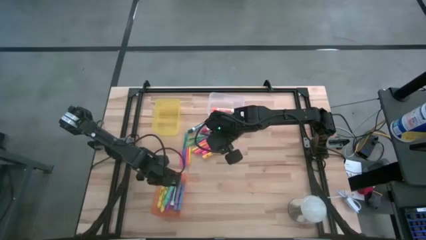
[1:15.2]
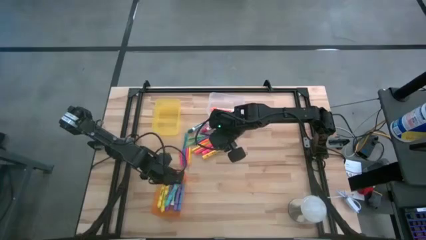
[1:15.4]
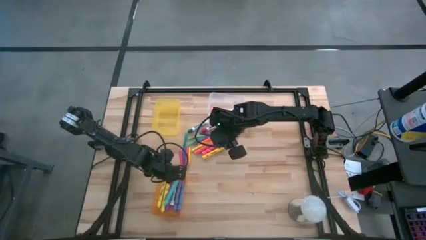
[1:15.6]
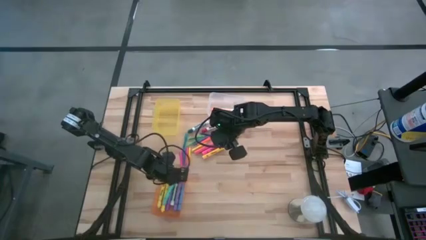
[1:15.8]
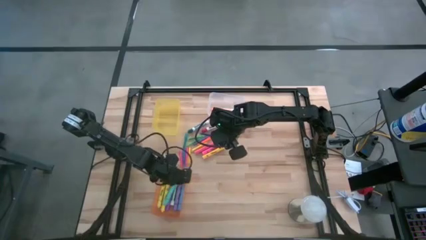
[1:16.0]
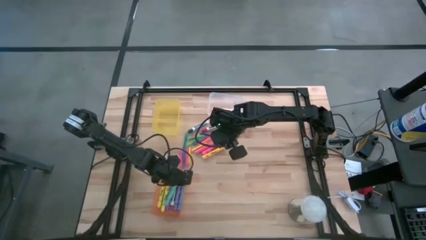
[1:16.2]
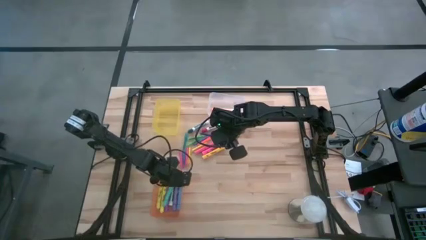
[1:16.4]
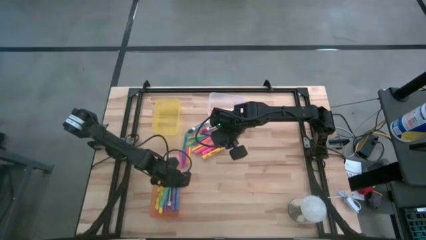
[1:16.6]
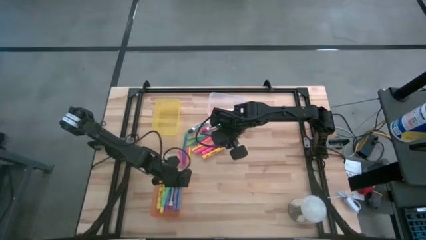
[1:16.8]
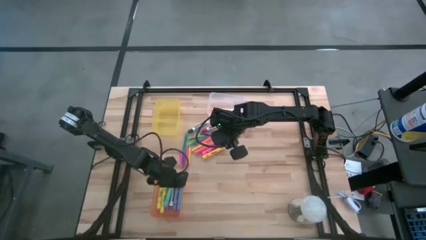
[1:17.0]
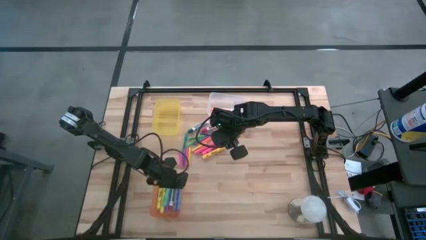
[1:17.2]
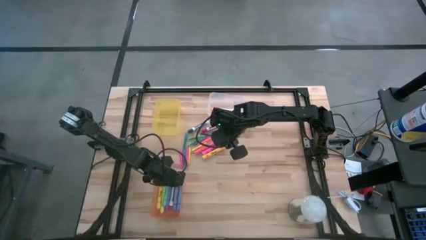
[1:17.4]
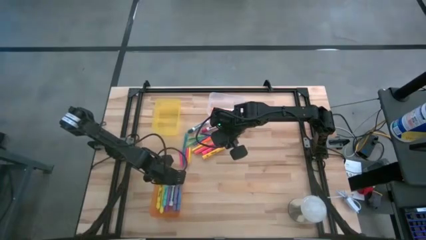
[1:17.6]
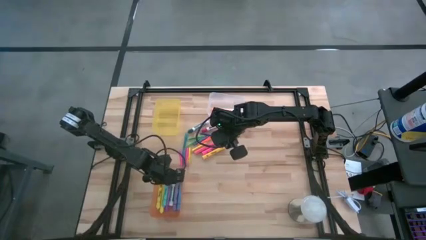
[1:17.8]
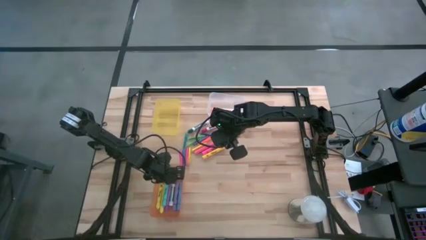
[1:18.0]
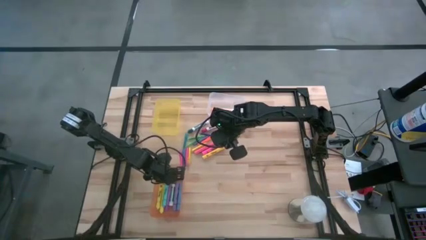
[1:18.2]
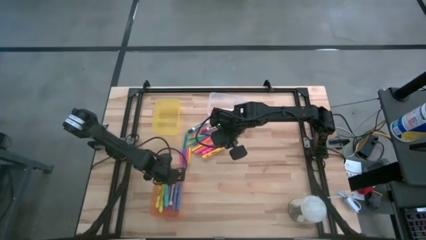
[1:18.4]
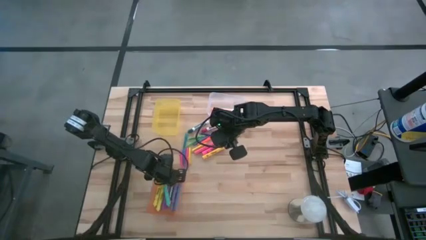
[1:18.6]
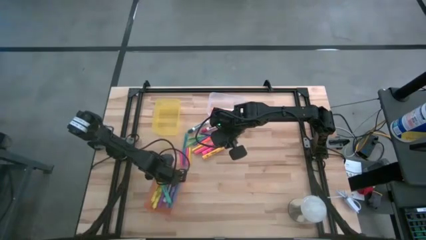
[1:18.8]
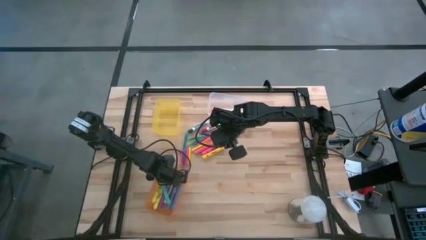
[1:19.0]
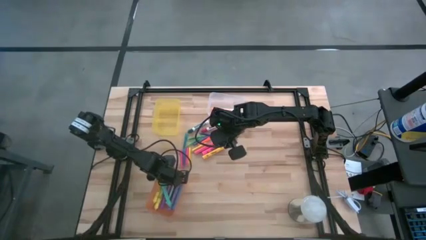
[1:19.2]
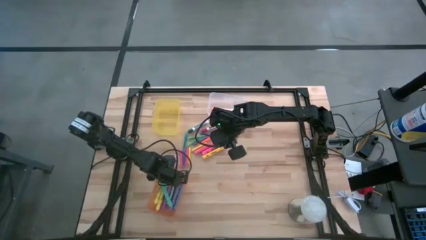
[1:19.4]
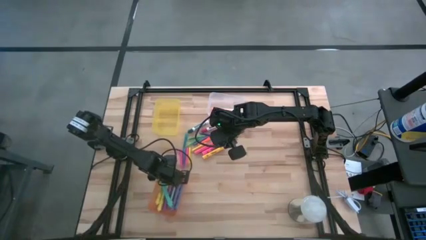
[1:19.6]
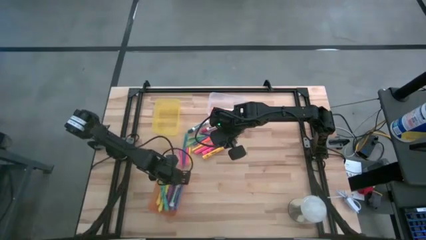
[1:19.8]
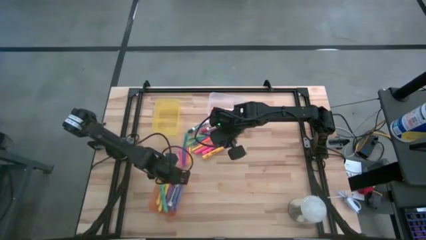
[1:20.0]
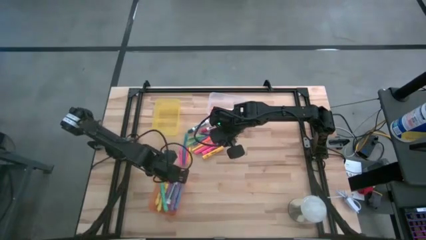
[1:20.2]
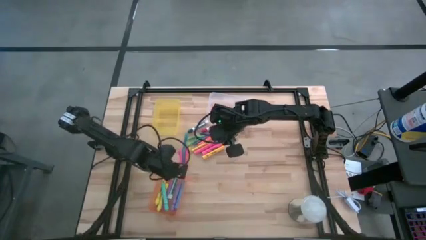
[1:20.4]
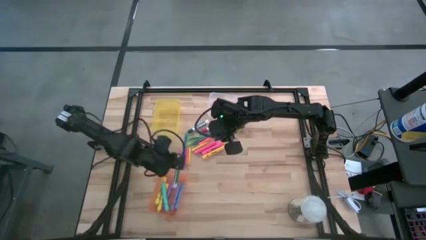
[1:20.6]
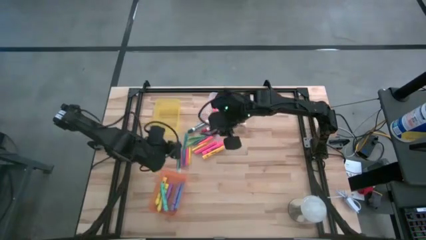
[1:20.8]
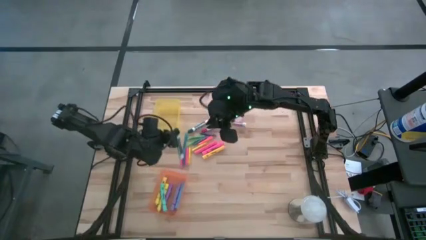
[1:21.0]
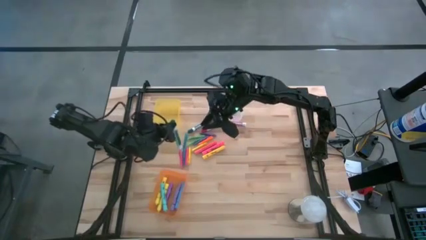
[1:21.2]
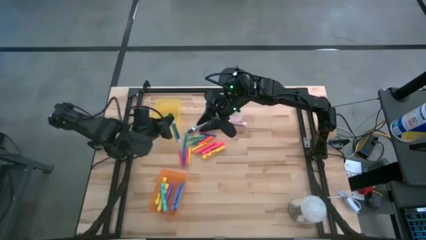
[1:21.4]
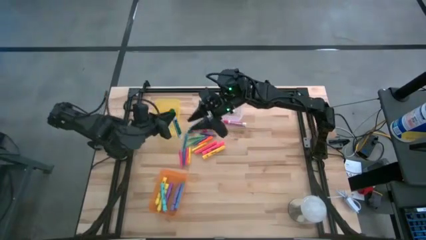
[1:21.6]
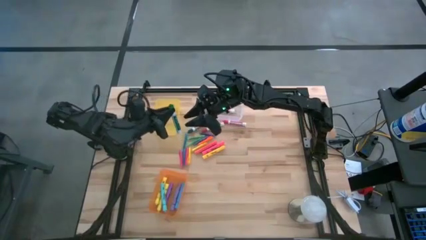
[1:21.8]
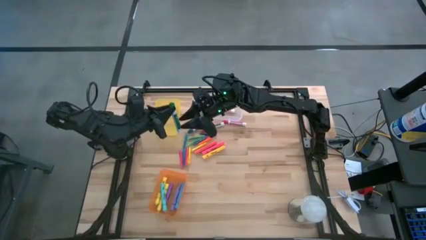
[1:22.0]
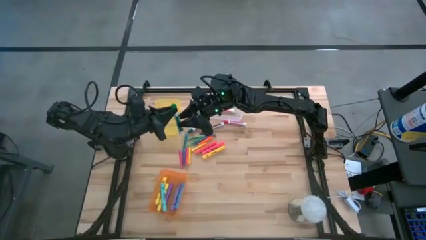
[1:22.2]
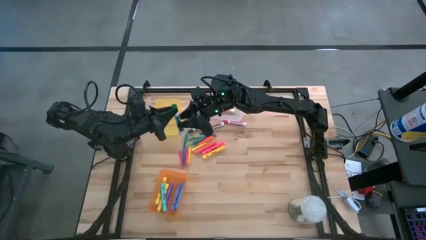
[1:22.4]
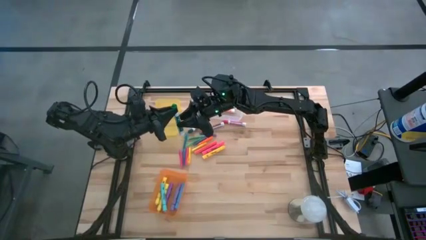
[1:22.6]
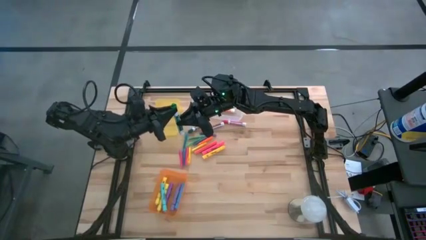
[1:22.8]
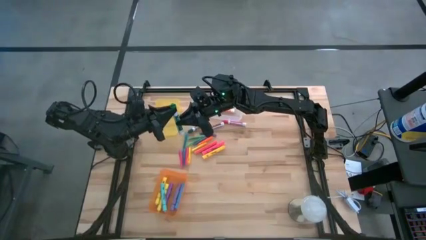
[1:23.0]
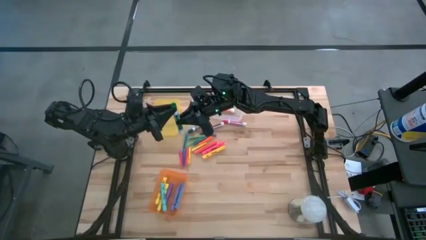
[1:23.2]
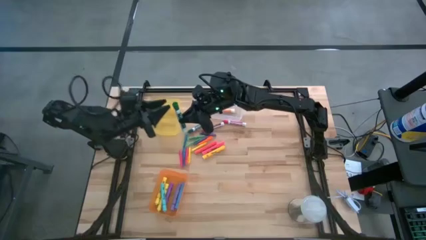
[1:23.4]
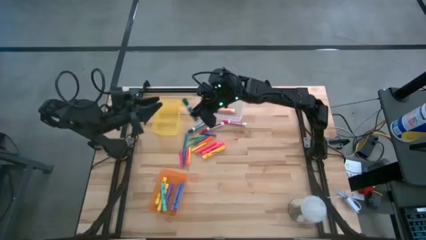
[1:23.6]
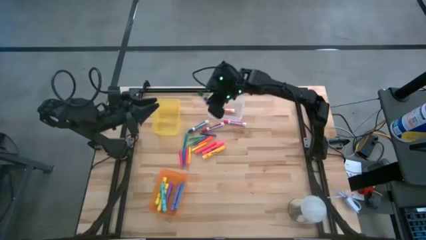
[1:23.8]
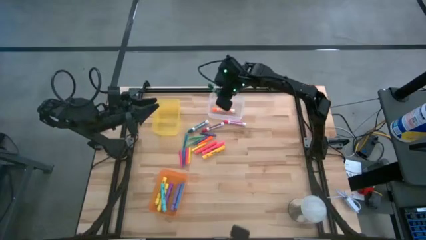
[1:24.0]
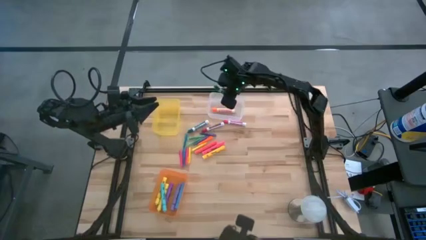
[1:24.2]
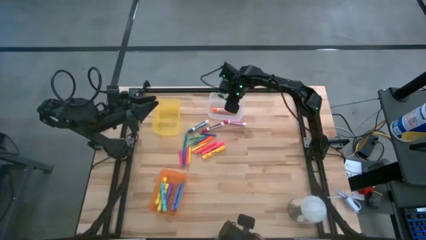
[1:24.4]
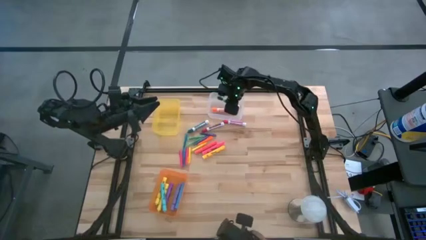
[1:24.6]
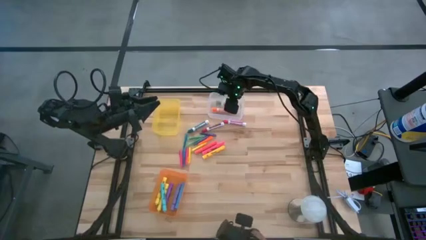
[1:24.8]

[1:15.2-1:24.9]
Task: Pick & Place Markers
Put the green marker from the orange bin into the transparent bin

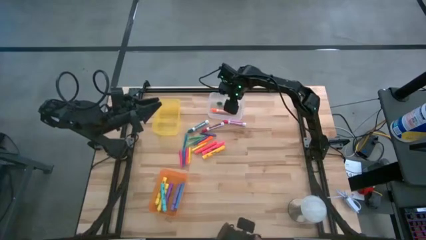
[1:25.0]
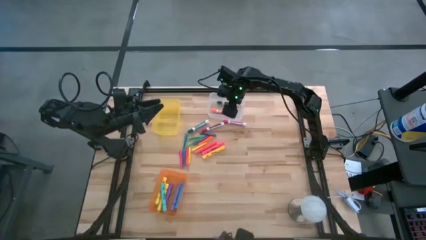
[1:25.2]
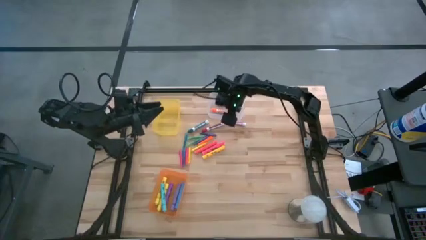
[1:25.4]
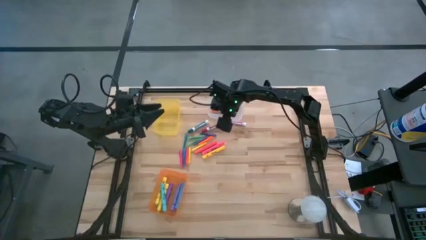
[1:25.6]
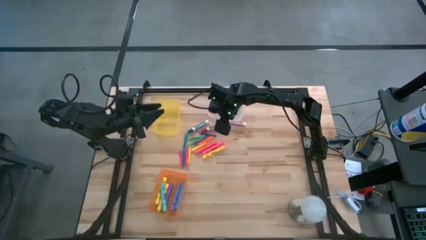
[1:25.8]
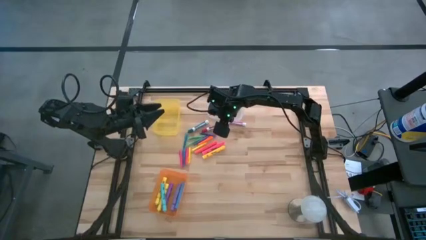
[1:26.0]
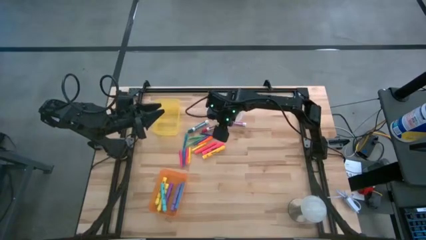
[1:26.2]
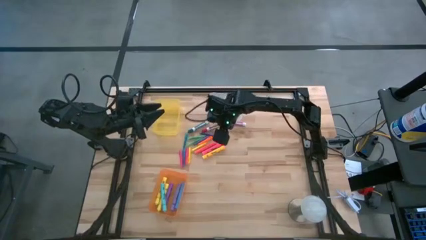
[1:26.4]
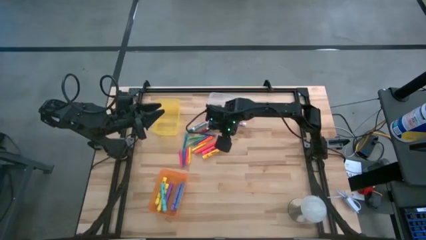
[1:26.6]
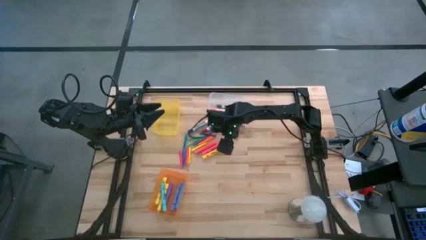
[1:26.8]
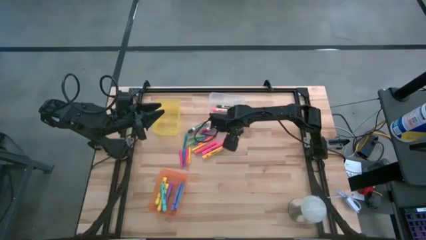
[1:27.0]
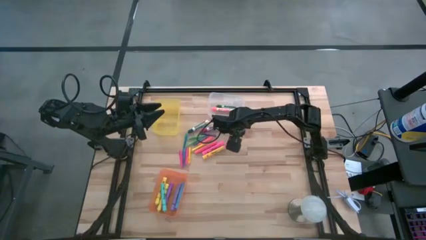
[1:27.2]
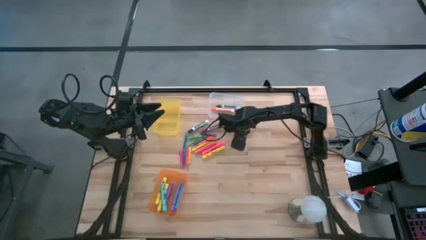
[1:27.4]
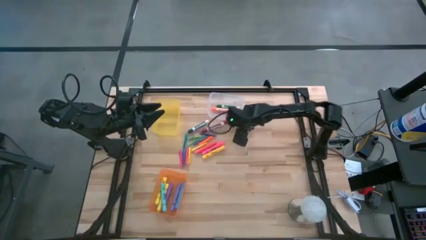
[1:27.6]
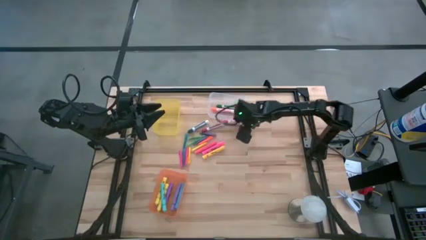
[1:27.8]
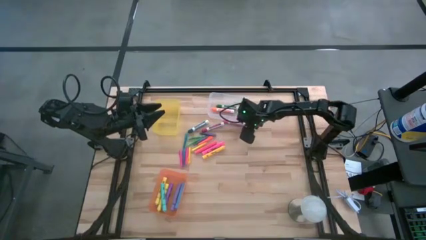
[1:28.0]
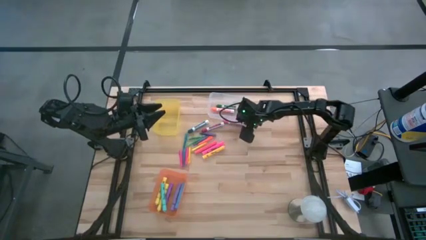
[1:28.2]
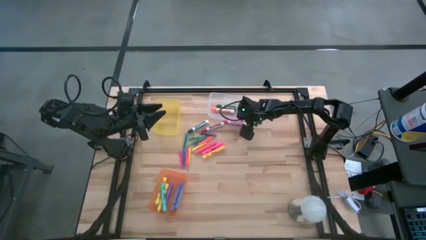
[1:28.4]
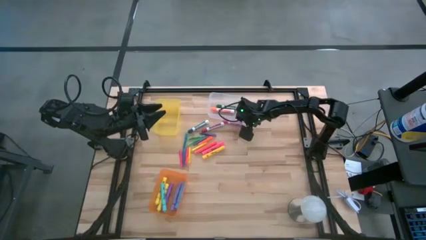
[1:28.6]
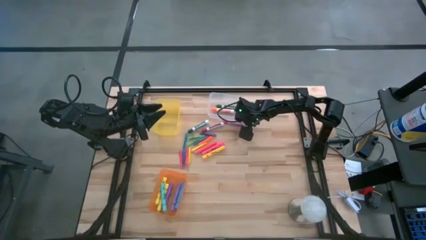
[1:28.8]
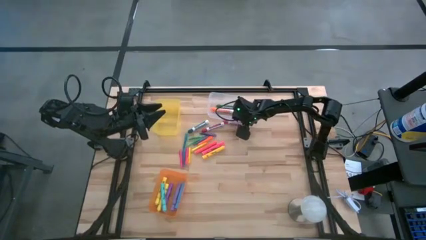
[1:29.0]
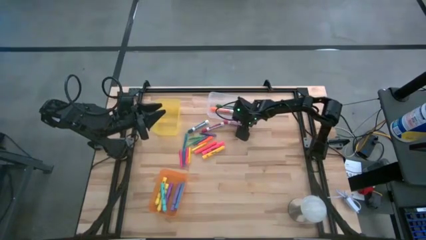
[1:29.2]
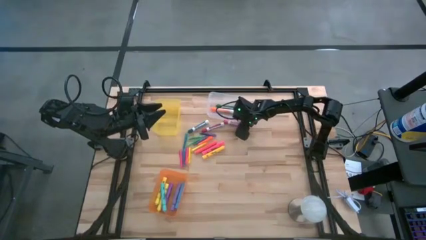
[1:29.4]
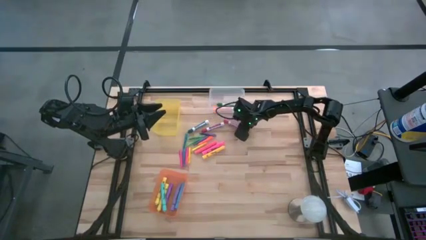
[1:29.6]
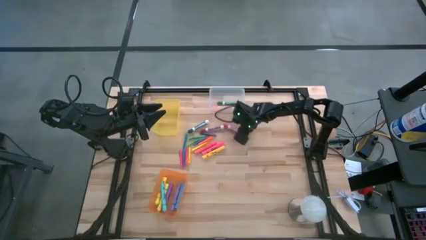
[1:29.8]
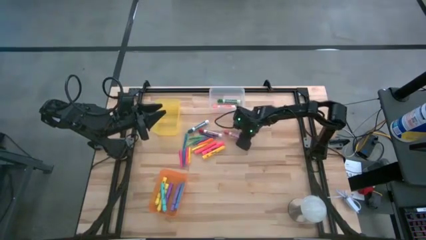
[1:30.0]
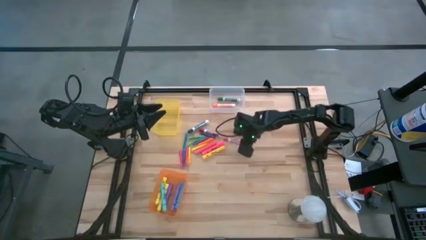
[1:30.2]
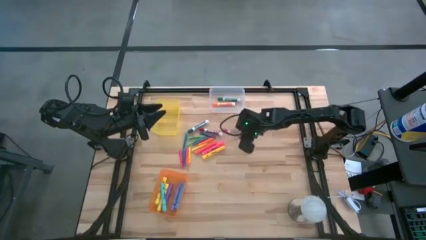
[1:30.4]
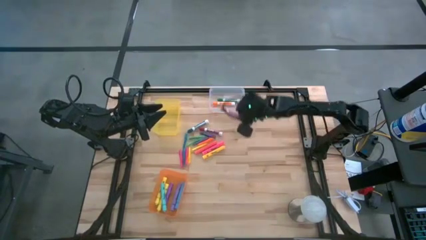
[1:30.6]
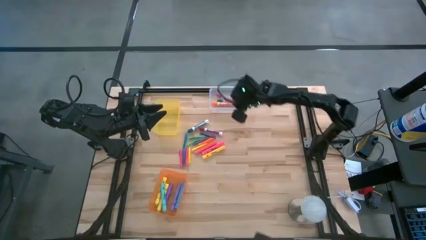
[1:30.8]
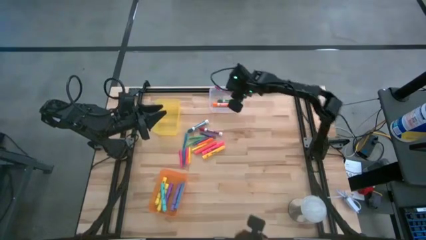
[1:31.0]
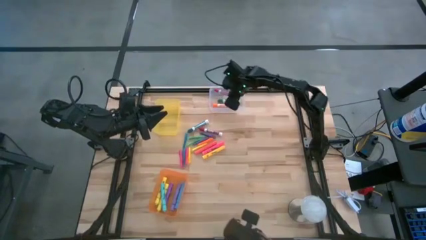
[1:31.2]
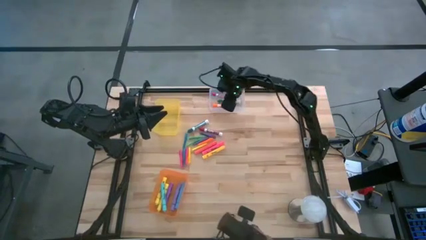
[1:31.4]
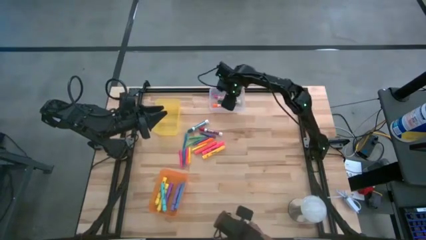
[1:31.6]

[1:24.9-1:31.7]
Put the pink marker into the transparent bin
